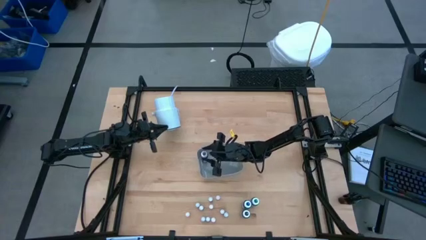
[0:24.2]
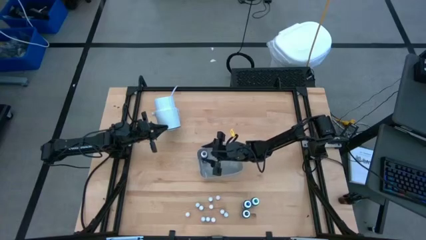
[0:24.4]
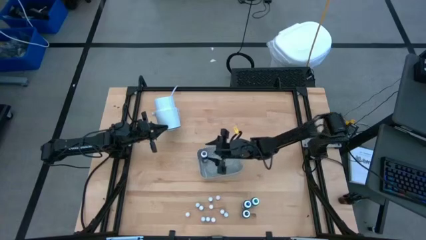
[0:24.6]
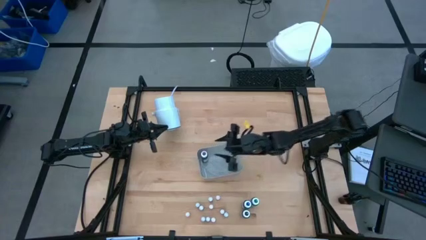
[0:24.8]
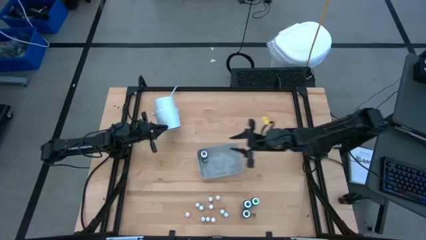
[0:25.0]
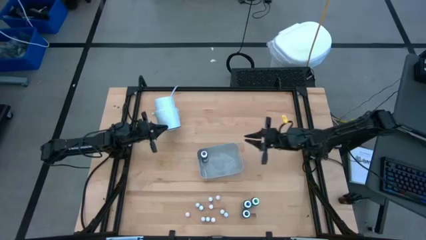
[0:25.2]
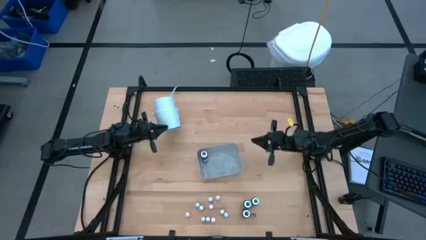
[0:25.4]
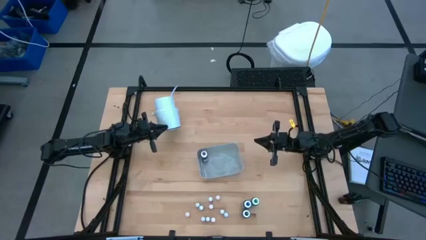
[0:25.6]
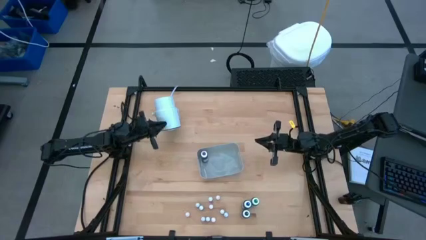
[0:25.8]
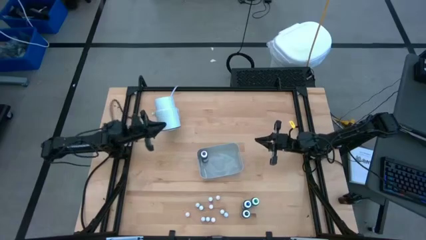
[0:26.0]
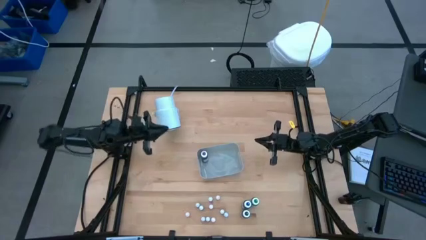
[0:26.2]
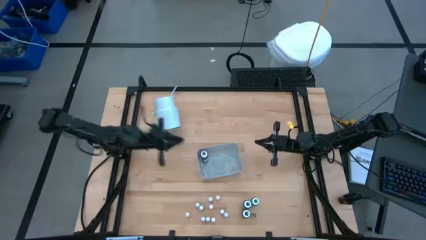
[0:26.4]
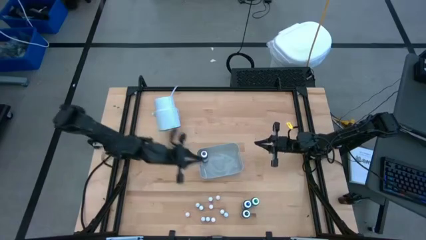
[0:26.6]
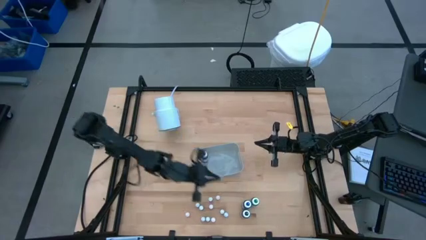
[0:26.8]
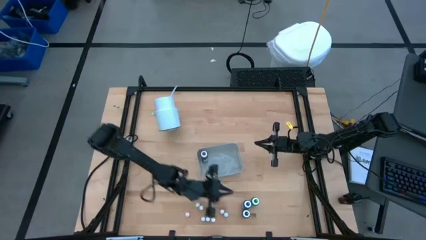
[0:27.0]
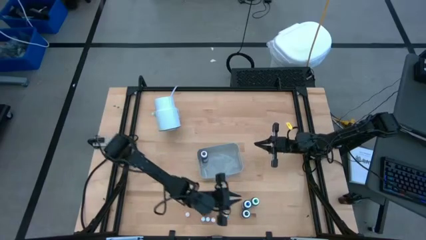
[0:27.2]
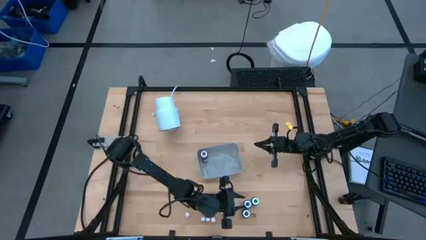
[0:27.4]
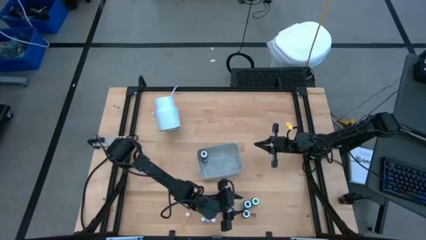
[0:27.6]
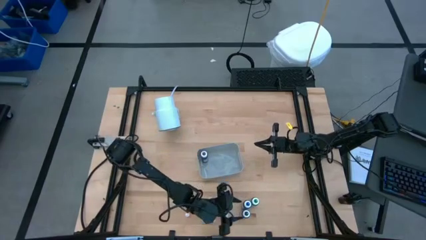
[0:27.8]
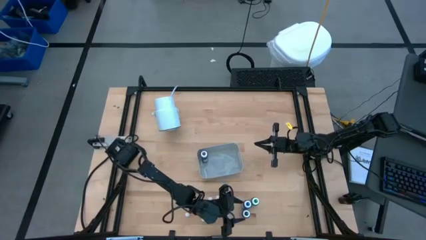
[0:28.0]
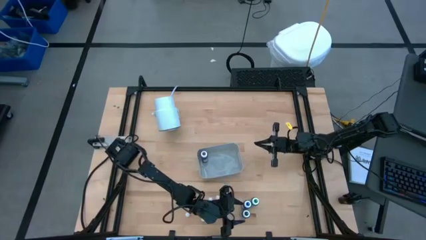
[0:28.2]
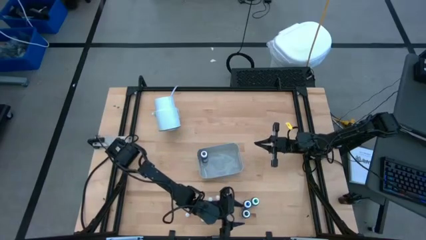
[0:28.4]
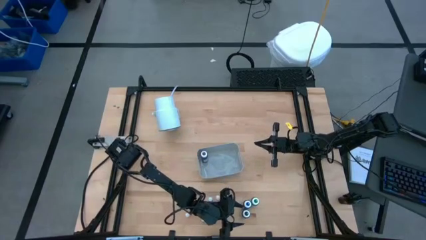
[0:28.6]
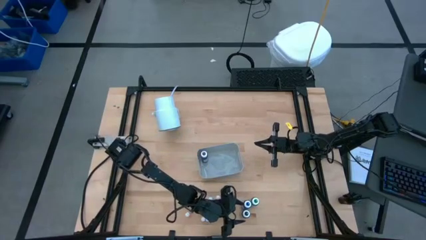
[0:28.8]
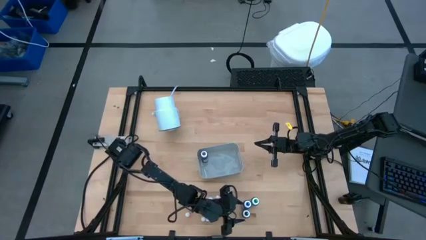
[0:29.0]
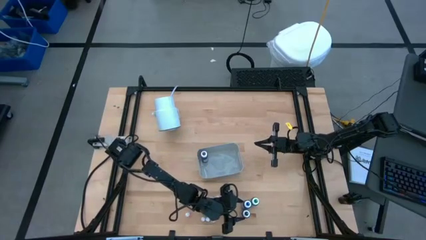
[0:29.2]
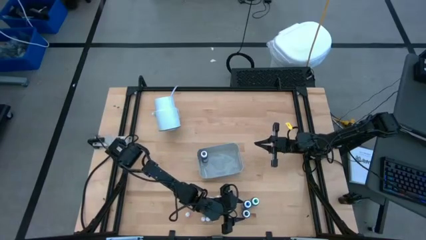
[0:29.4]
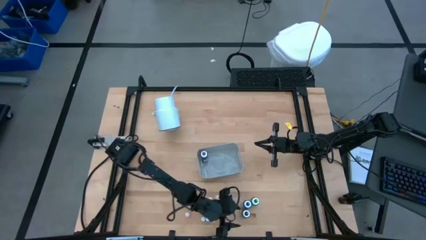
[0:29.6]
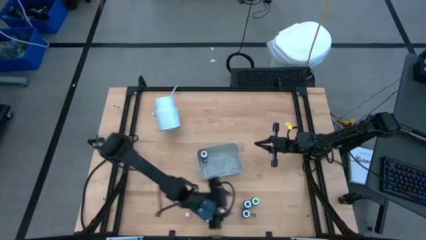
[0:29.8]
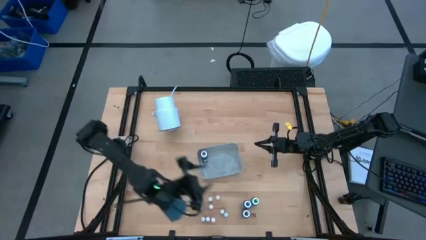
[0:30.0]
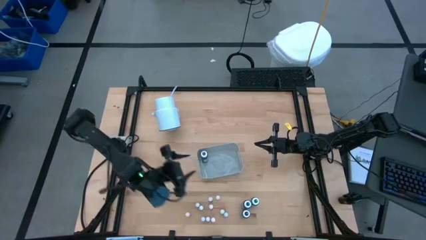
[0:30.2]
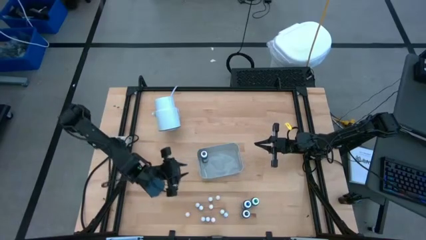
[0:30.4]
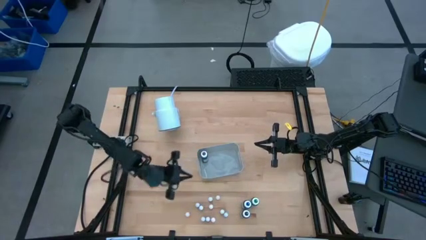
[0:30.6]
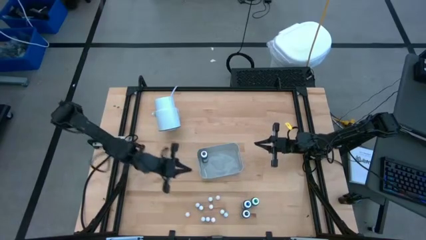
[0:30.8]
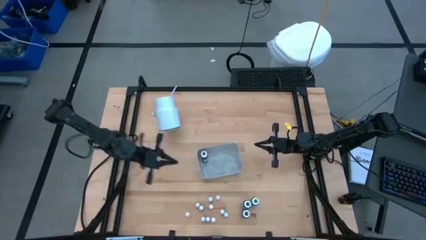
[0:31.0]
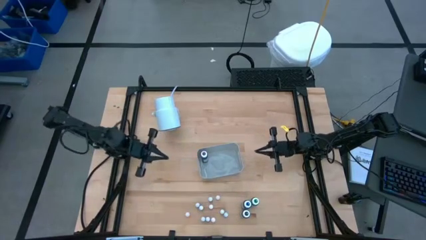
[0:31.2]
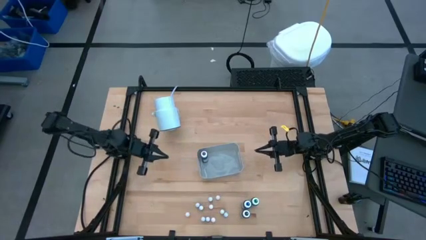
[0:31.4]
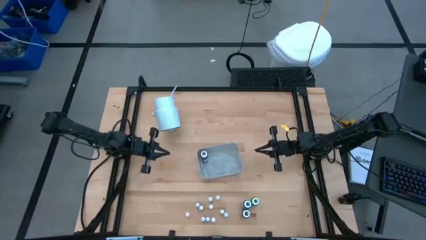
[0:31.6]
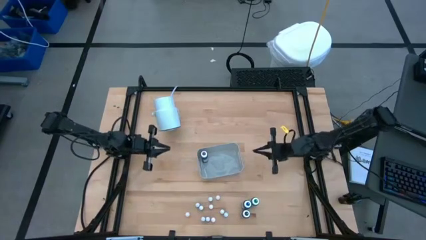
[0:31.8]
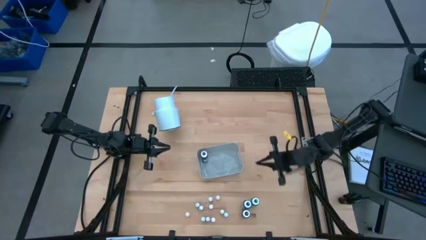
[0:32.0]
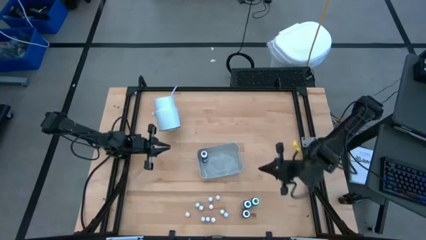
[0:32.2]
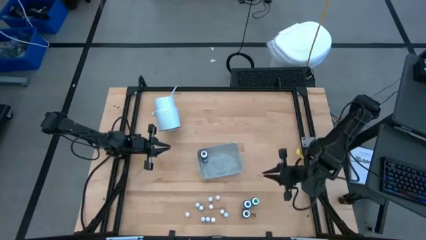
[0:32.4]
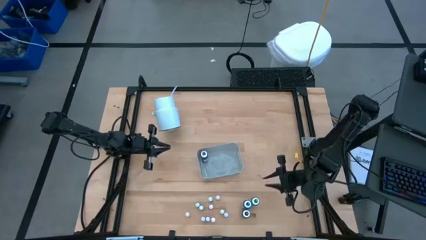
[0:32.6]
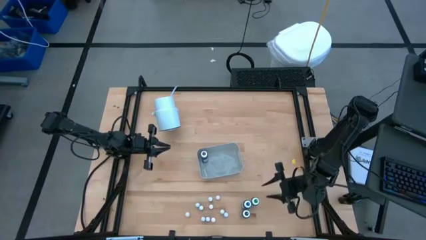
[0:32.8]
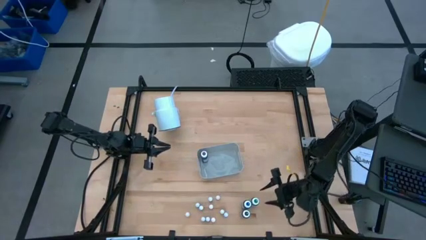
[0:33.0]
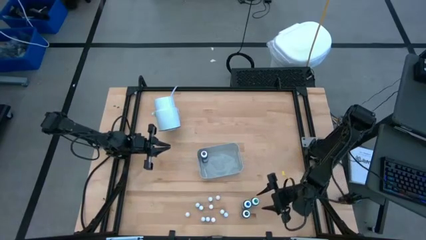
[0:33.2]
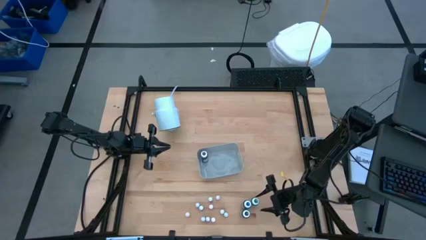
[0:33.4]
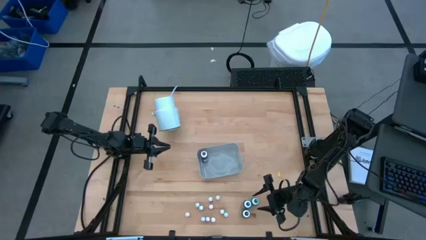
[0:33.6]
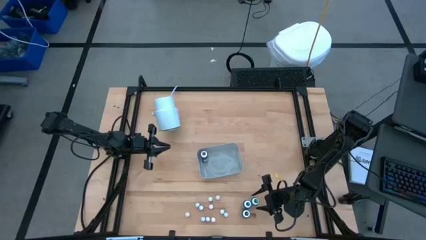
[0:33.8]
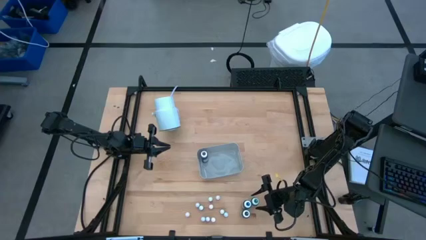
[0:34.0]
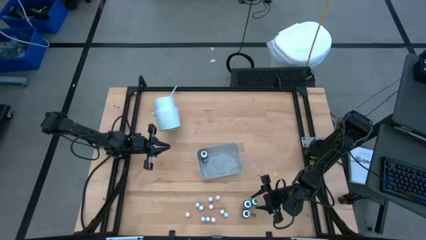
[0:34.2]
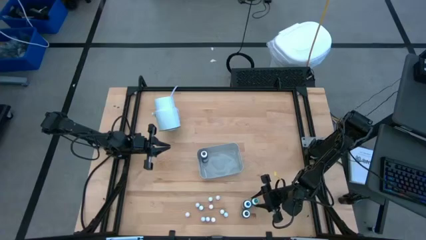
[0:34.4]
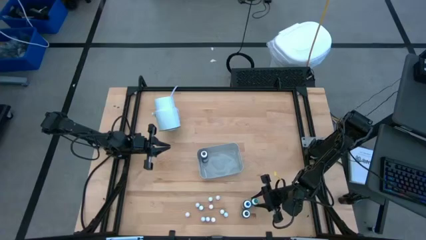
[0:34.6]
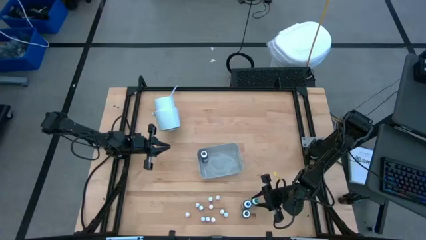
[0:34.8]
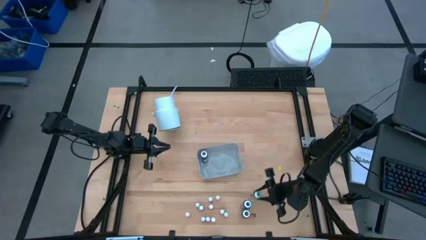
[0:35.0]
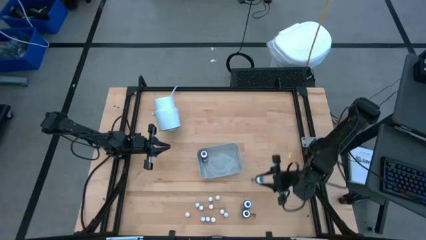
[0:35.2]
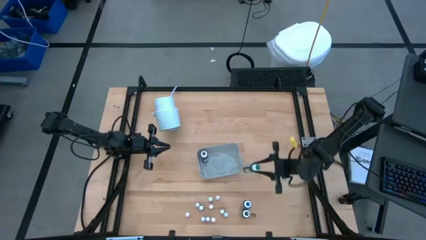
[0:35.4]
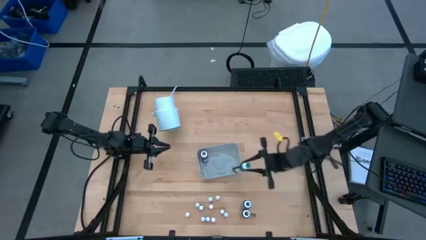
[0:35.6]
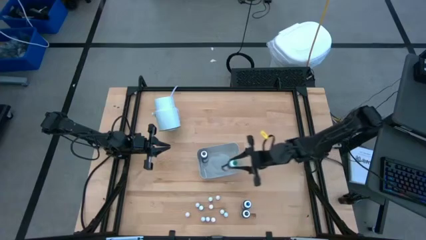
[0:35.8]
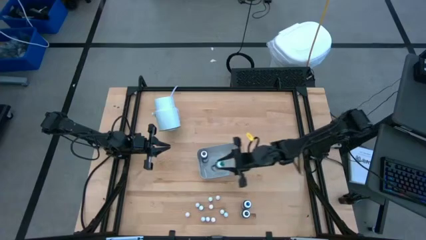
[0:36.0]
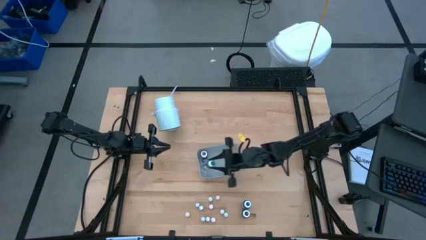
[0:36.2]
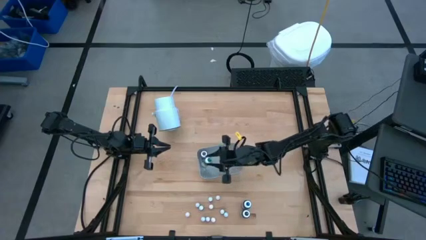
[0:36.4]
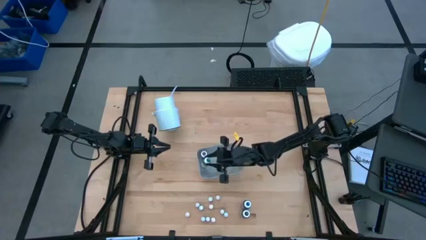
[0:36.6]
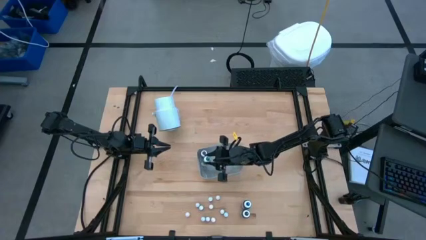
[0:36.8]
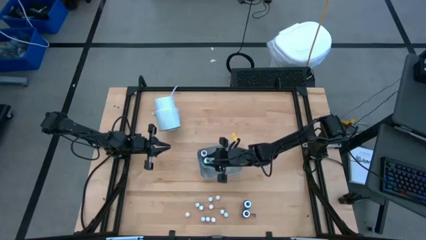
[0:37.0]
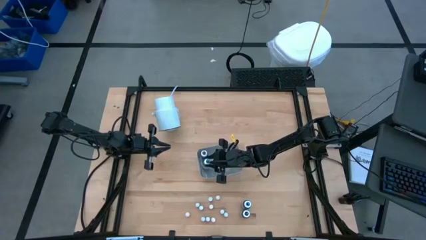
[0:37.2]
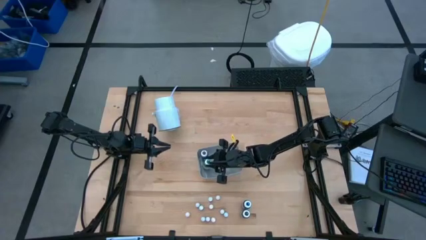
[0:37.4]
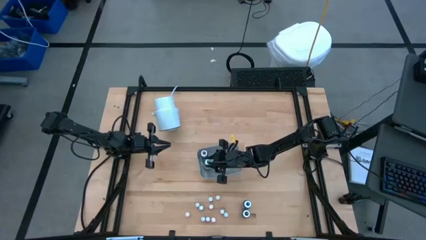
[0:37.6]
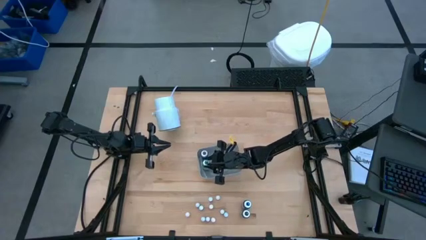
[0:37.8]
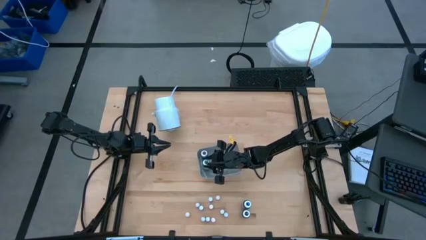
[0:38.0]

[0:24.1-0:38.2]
Task: Pick & Place food coloring
Put the large green food coloring bottle into the bin

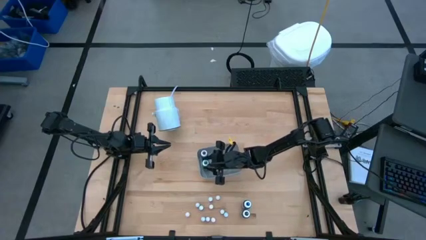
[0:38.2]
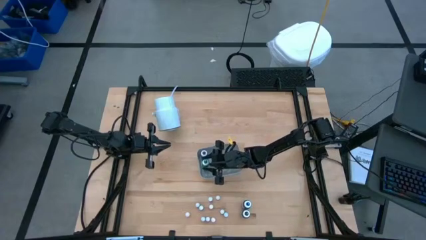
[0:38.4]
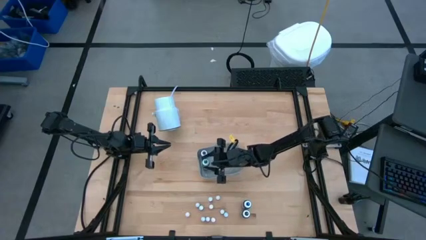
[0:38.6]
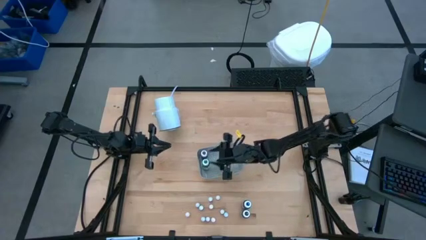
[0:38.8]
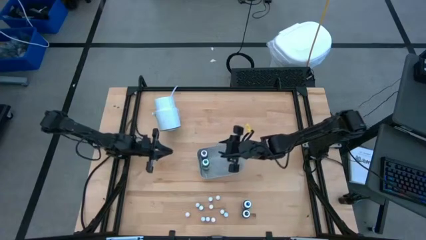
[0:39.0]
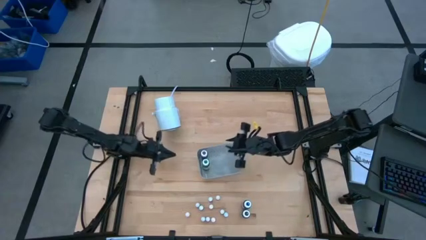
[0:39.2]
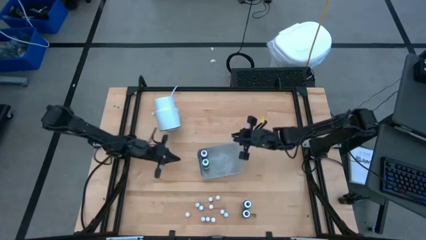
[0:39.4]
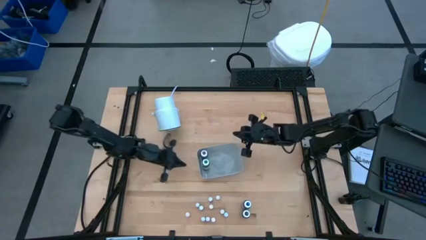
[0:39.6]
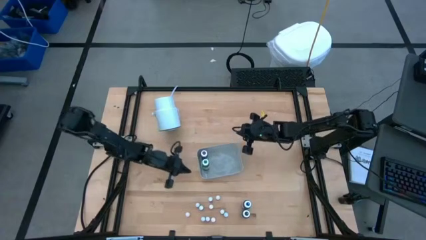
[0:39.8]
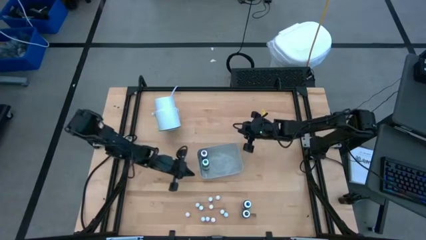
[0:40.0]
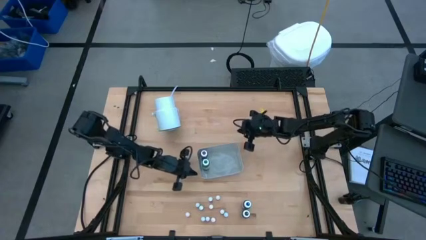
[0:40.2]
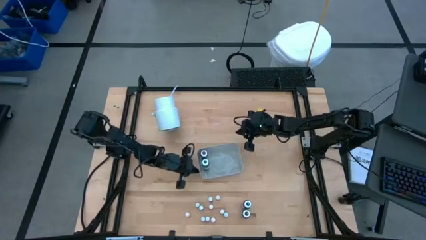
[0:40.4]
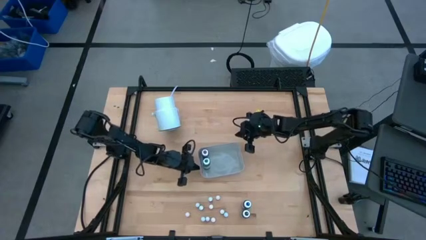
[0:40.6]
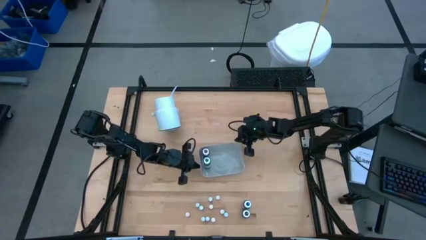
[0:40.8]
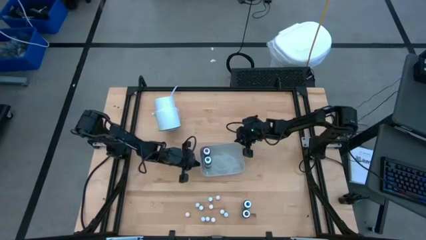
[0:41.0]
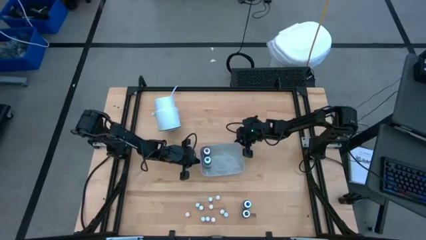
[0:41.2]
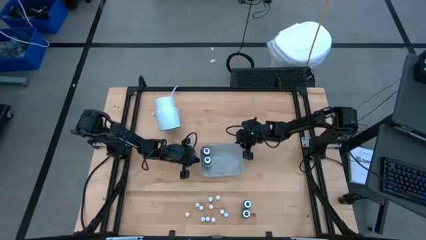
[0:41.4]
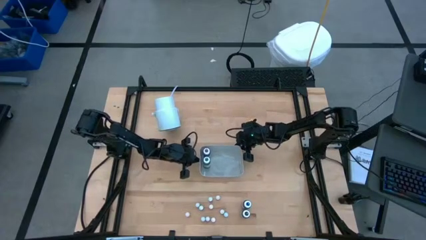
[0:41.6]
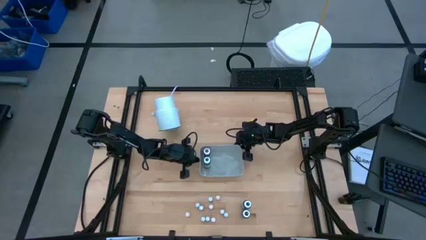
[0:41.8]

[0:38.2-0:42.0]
Adjust the bin on the table
